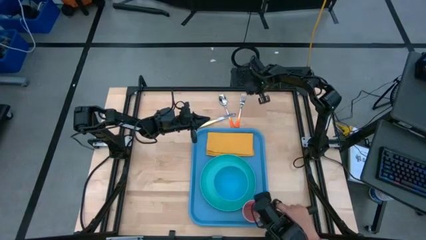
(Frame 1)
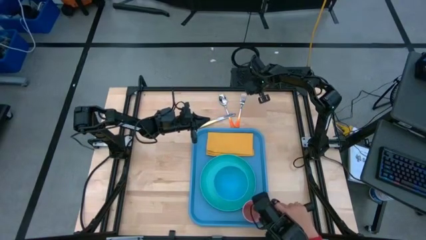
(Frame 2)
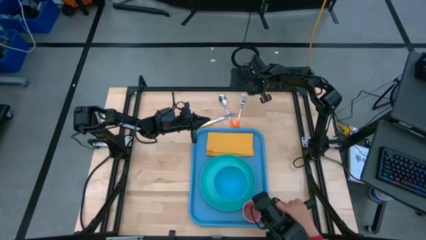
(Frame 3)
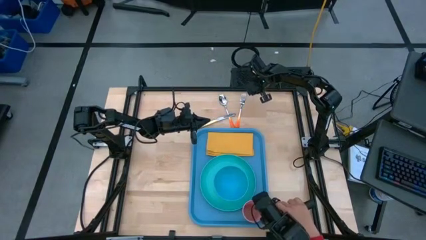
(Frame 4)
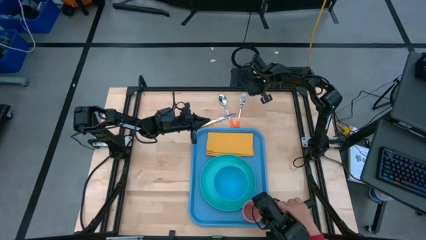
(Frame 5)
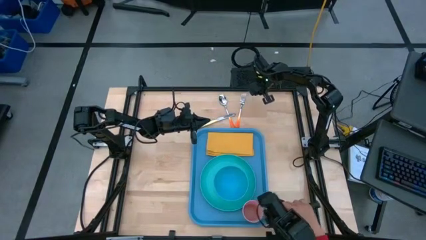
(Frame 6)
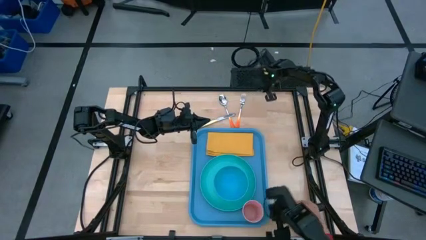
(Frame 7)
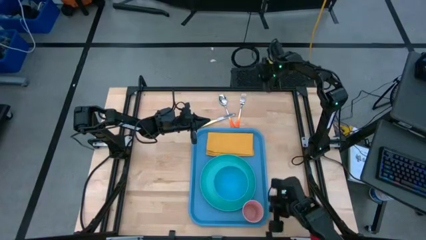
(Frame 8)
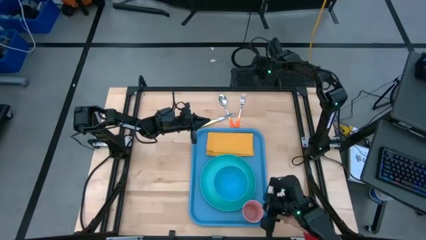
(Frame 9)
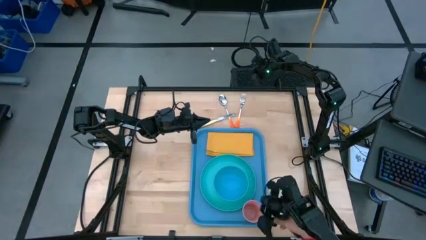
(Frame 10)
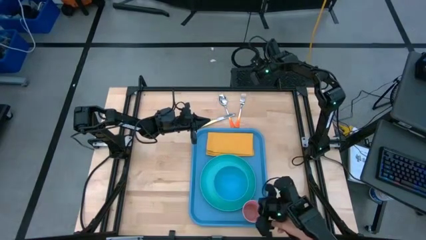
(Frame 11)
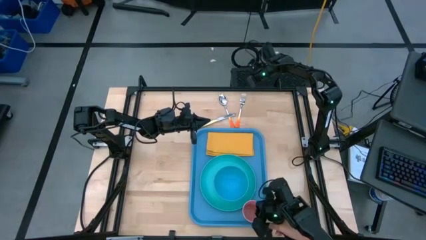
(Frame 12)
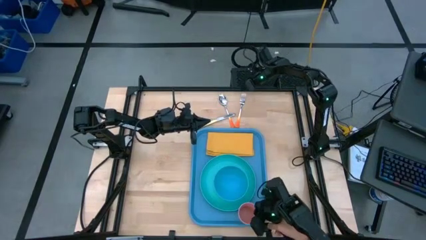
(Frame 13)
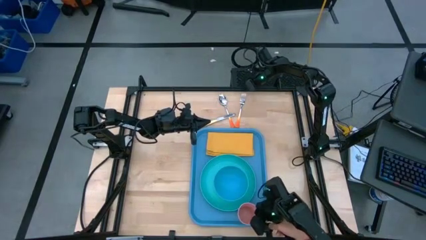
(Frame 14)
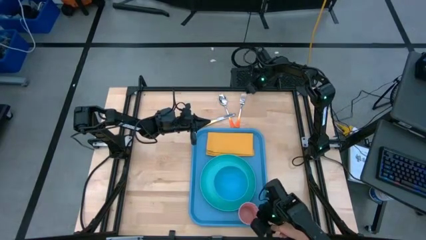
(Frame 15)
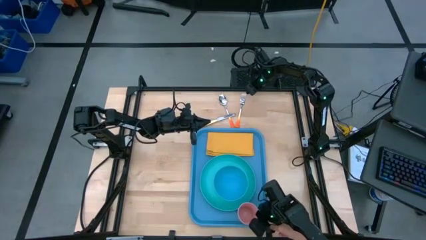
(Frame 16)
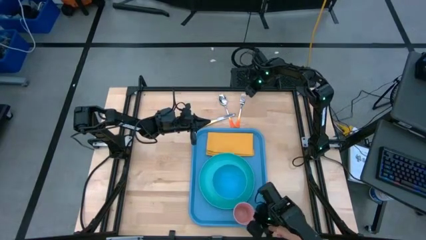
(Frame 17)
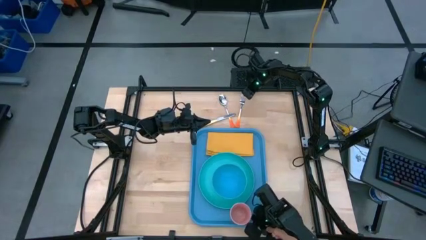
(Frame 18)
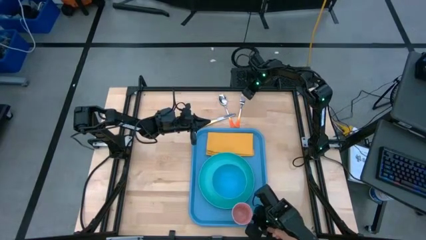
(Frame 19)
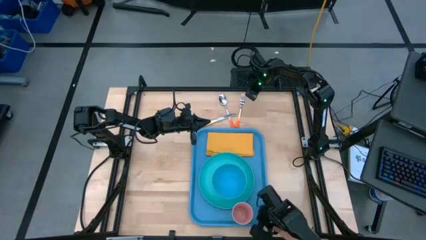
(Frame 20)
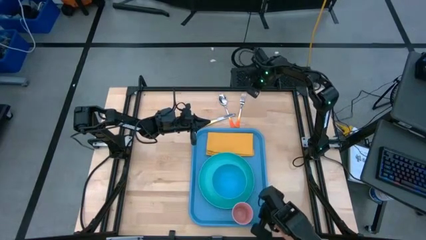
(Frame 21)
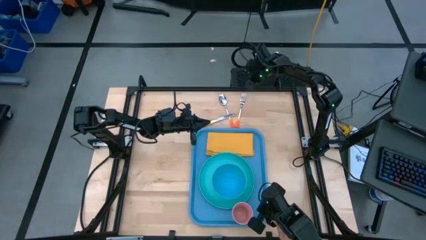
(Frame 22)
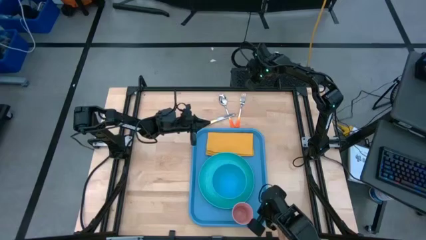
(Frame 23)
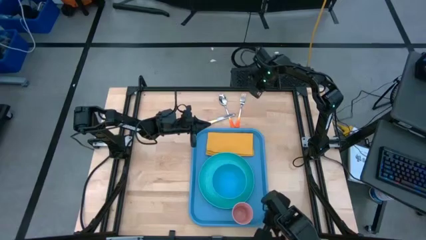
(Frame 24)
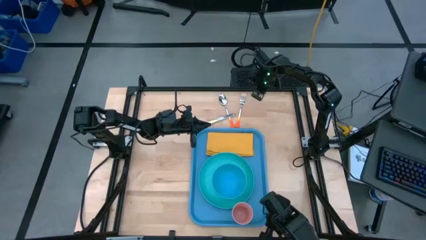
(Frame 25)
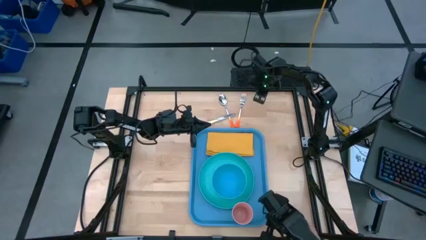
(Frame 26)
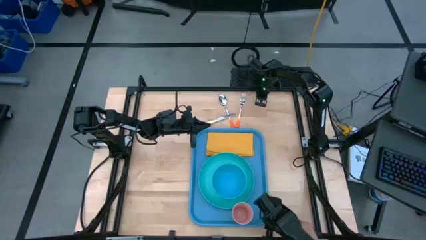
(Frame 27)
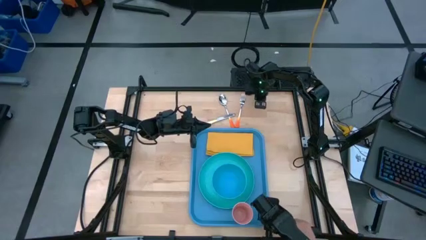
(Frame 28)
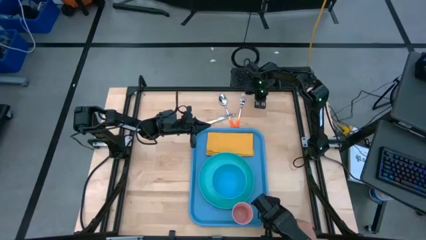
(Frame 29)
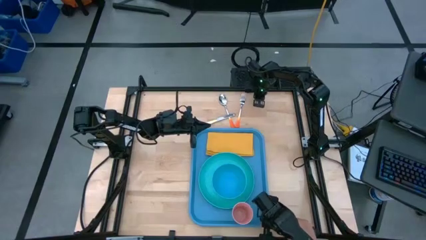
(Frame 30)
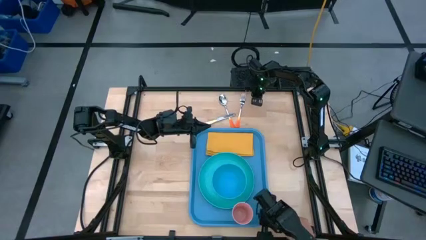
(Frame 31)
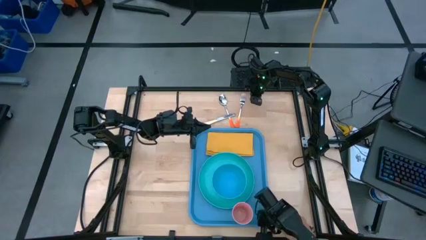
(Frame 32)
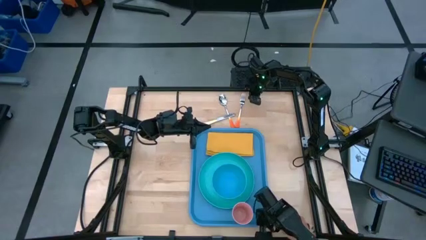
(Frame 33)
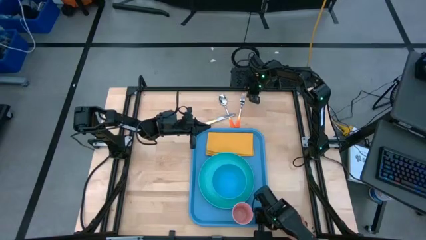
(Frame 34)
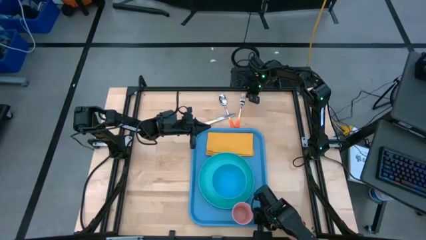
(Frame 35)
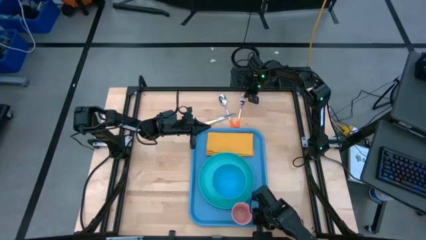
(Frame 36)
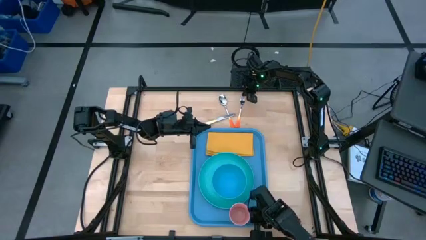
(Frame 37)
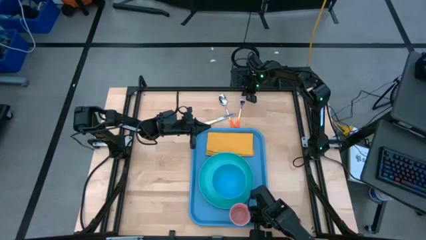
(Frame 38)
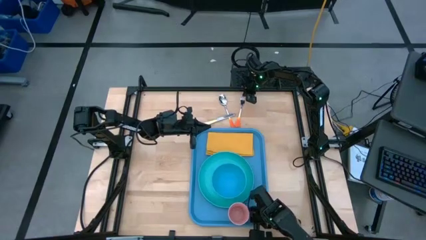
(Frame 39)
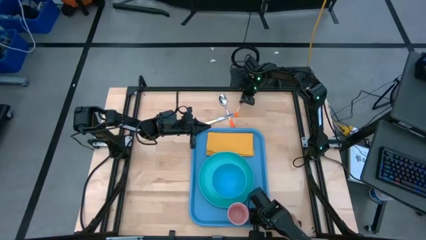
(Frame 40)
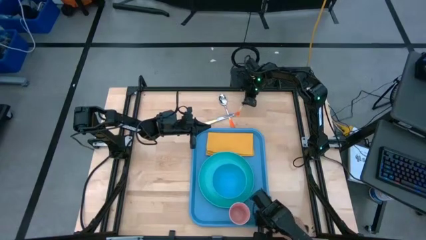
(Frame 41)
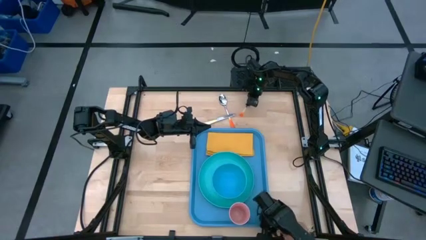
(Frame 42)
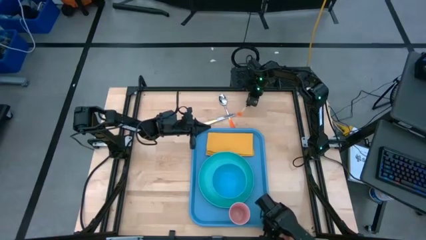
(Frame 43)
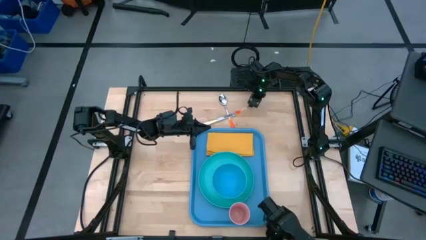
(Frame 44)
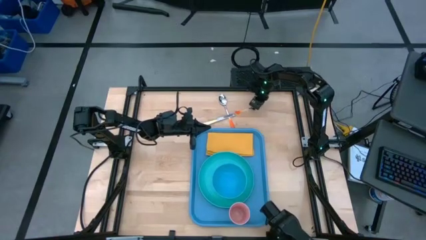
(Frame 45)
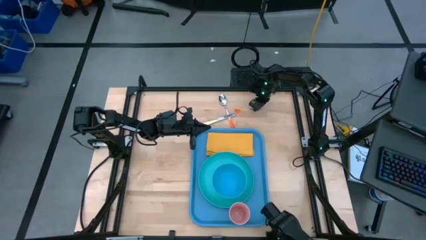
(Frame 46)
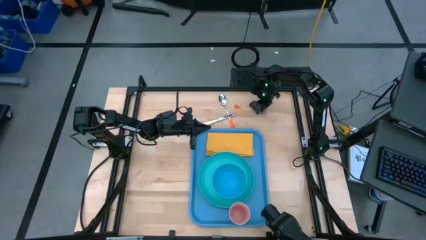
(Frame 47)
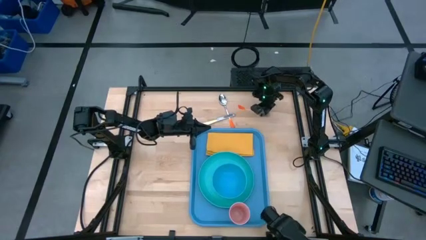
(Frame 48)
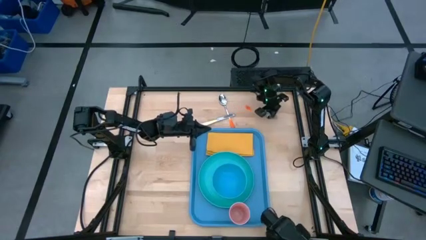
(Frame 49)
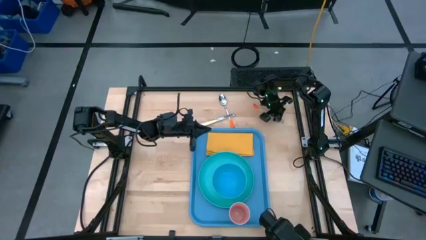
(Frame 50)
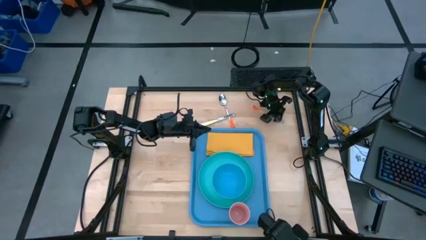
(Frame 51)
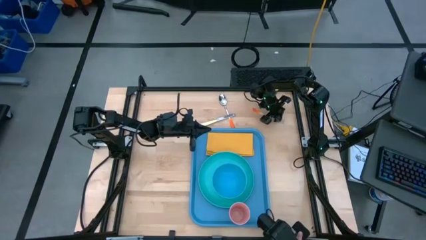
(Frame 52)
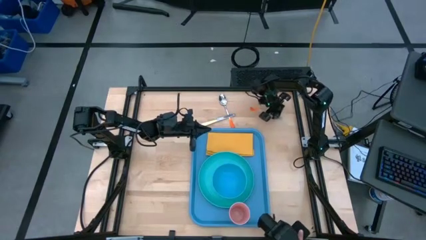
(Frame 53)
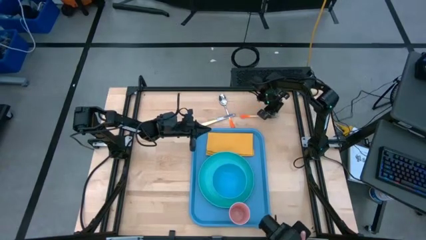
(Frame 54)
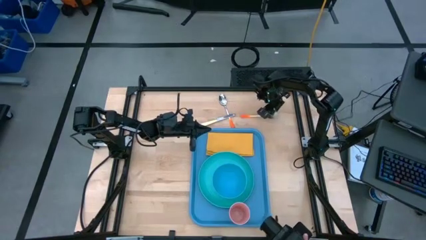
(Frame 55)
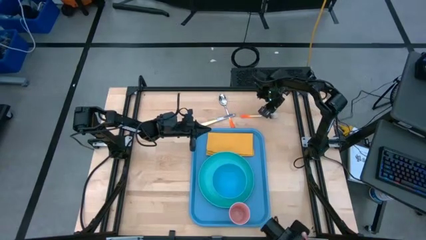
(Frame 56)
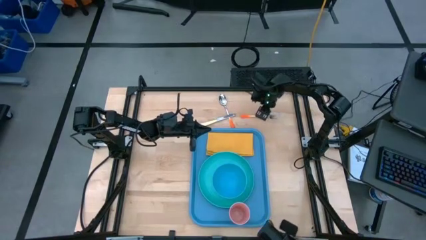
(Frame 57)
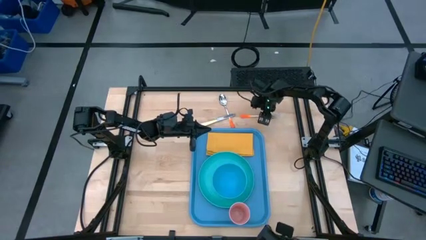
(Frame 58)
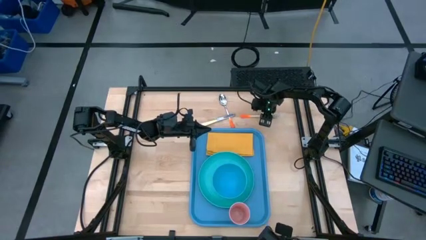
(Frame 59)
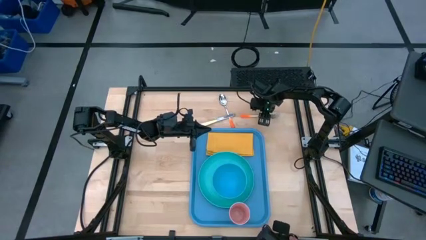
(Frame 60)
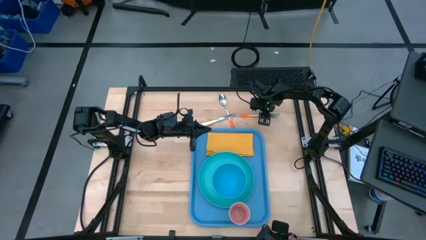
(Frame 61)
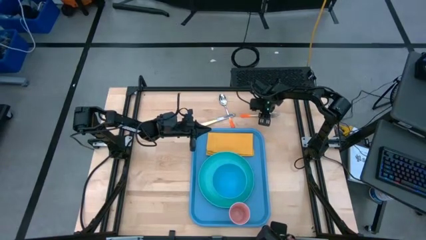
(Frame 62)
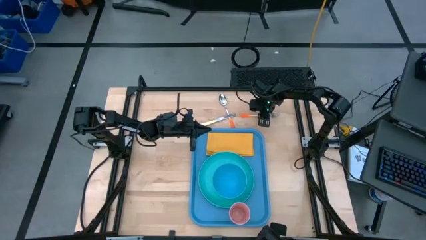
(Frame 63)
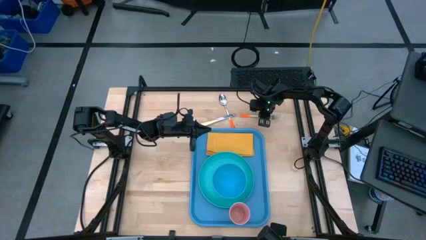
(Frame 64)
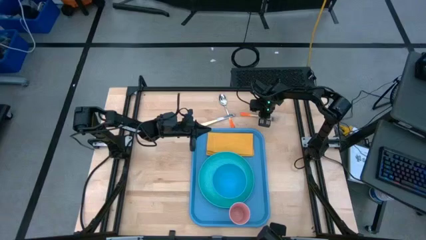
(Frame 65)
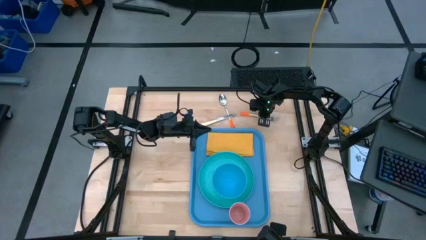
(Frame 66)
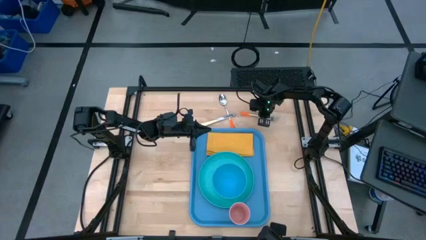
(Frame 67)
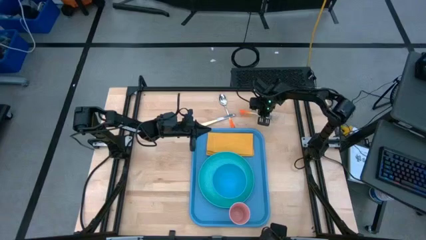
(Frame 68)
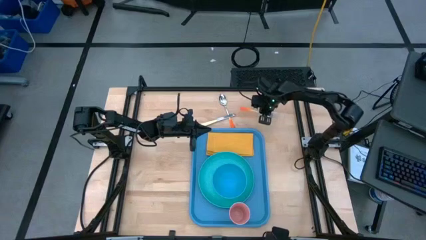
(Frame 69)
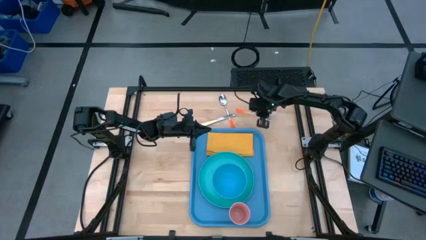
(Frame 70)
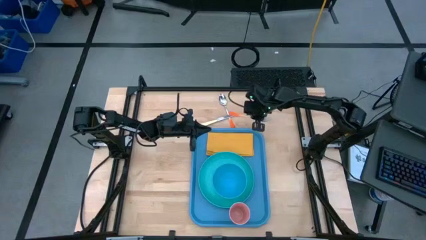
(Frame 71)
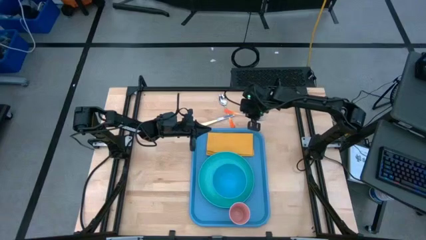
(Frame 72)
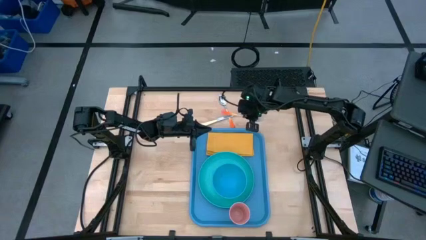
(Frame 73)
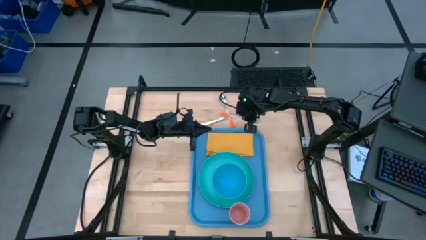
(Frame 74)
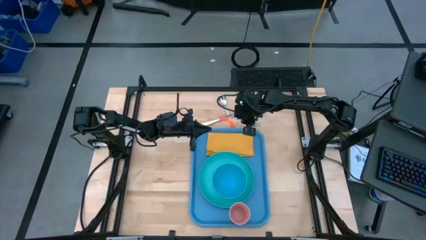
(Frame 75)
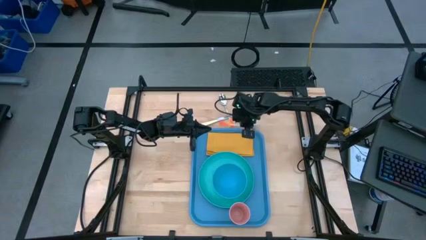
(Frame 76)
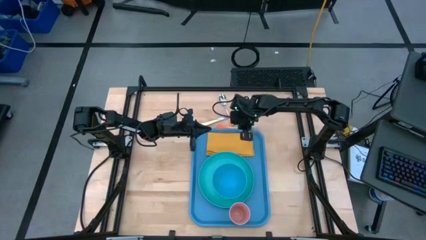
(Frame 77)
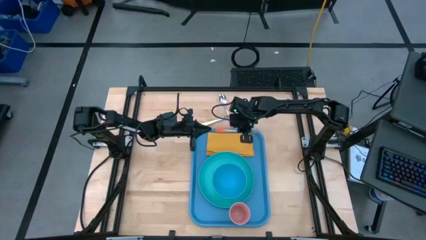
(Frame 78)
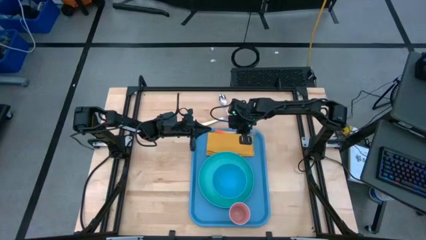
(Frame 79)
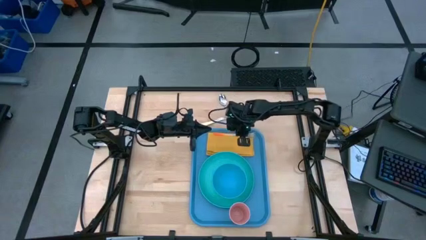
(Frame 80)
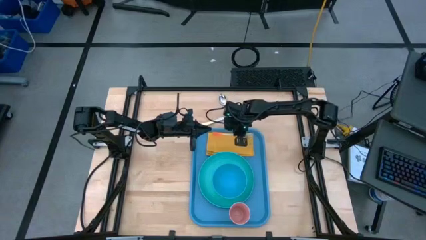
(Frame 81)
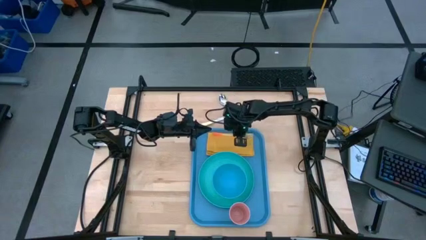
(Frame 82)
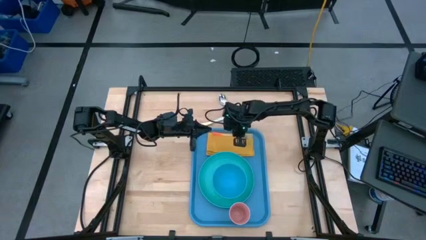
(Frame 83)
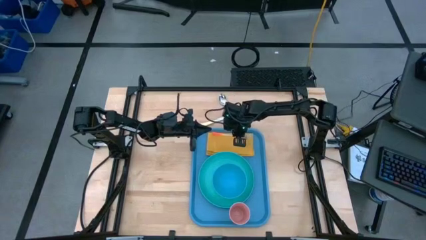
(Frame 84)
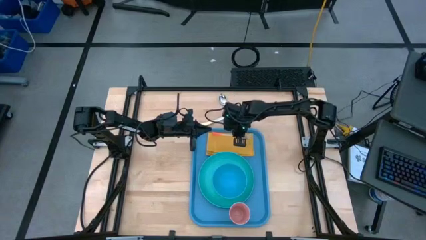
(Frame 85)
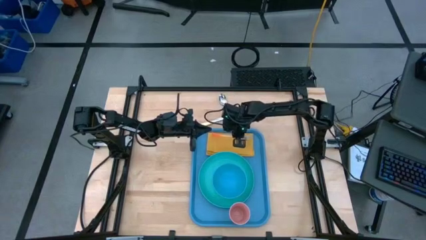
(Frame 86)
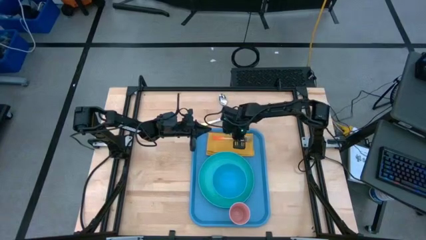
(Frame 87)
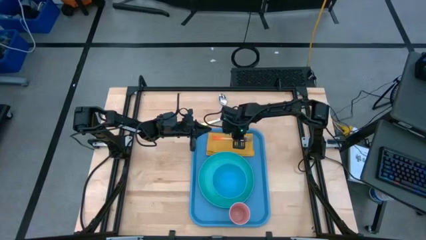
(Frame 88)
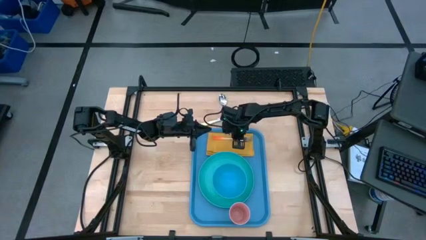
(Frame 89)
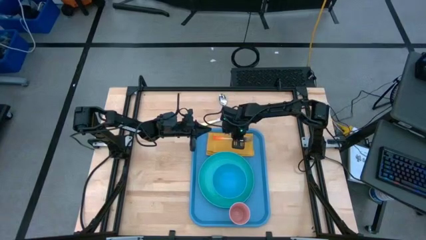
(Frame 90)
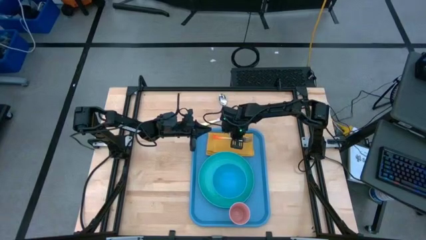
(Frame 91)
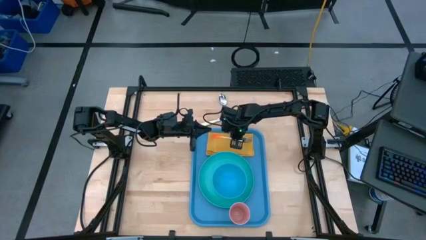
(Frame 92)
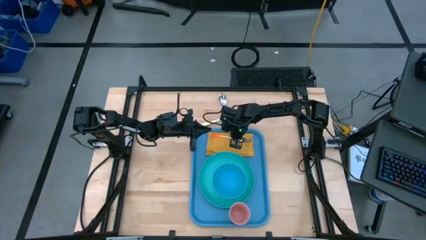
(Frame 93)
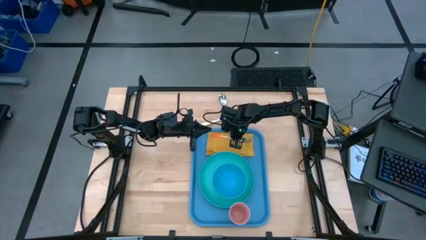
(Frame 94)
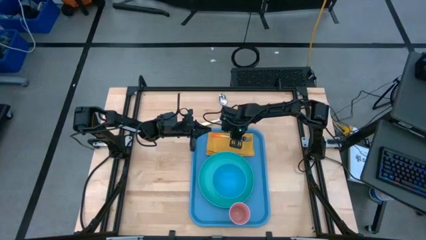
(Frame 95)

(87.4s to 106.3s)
Task: Set up tray
Put the orange fork on the yellow napkin on the blue serving tray
